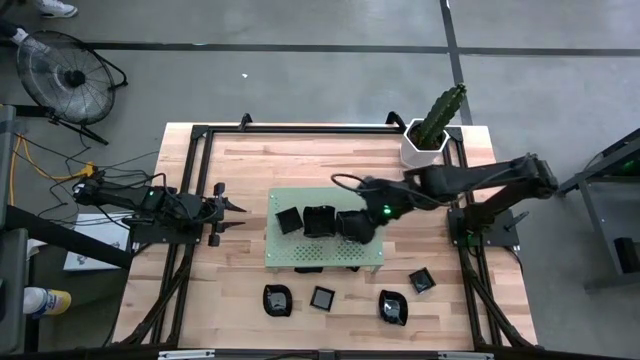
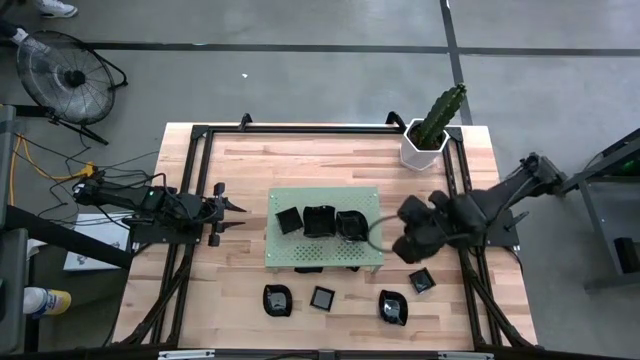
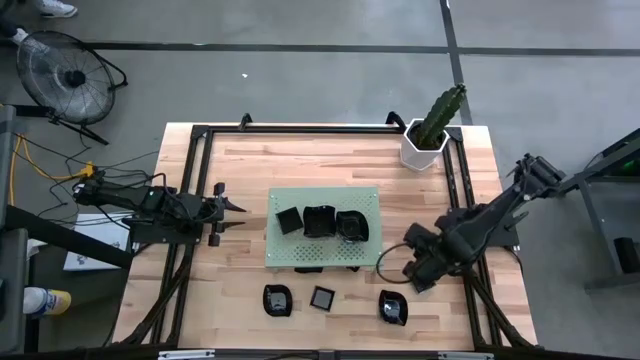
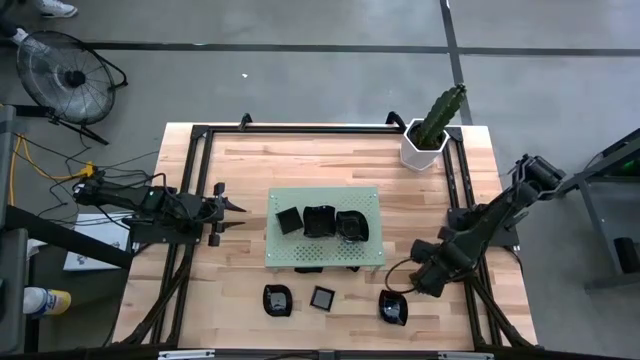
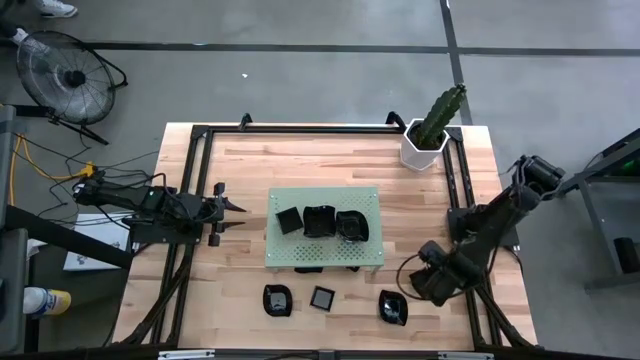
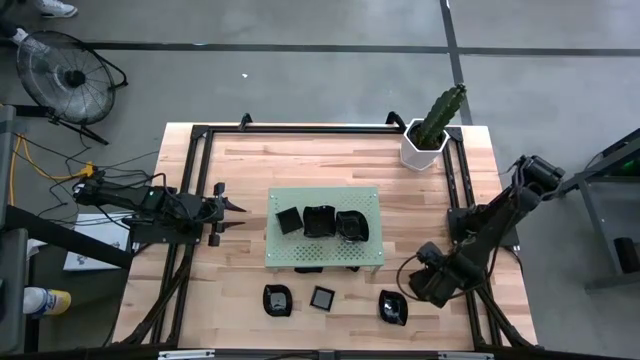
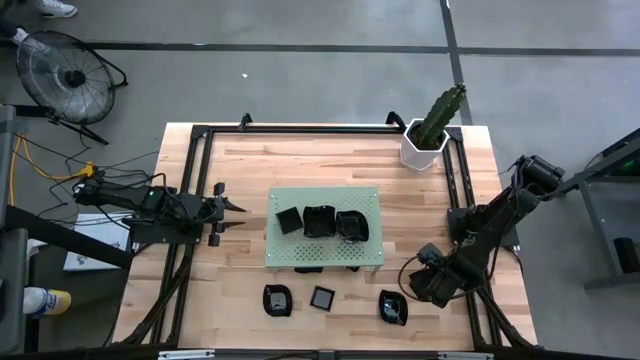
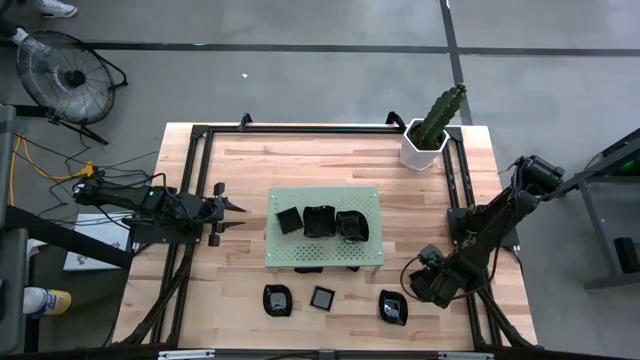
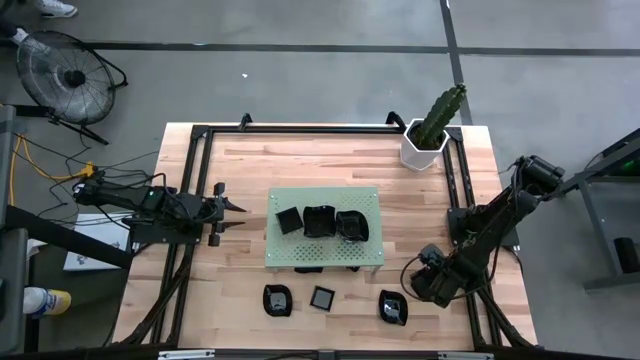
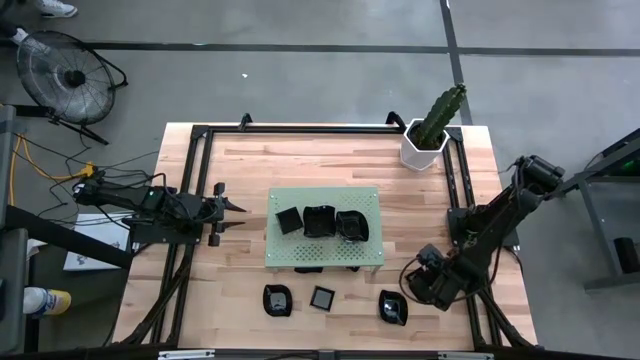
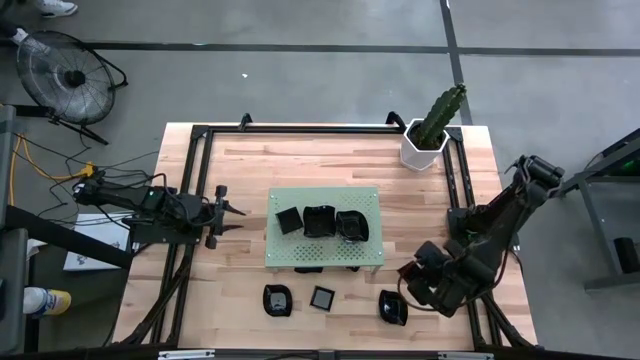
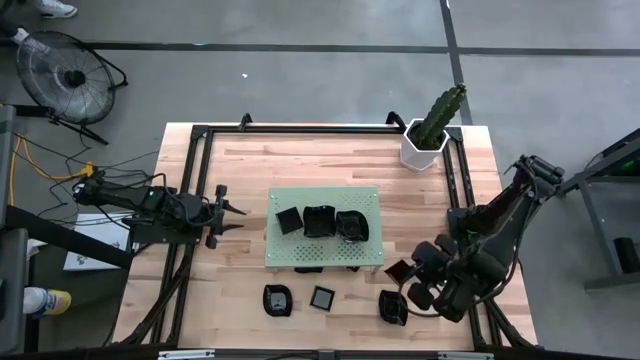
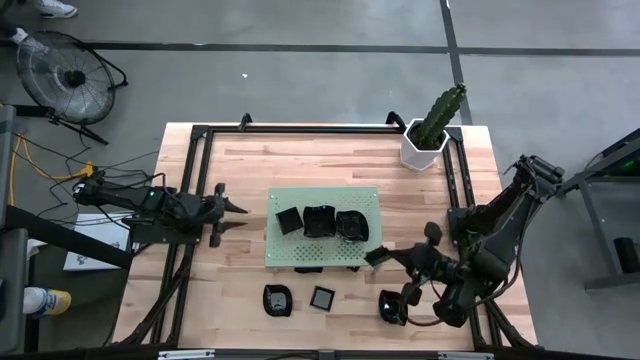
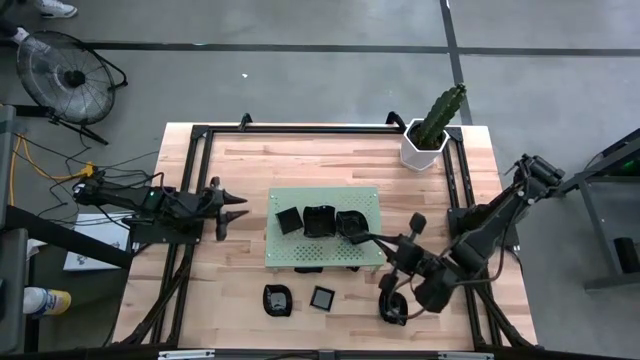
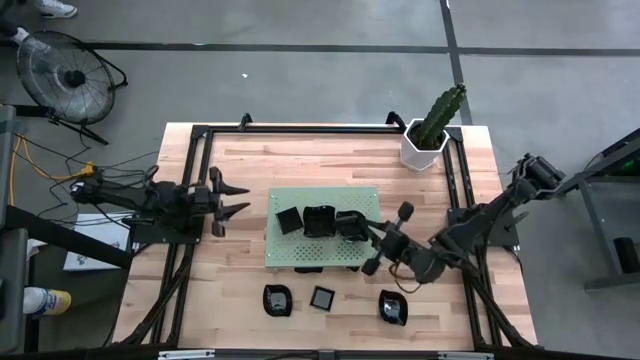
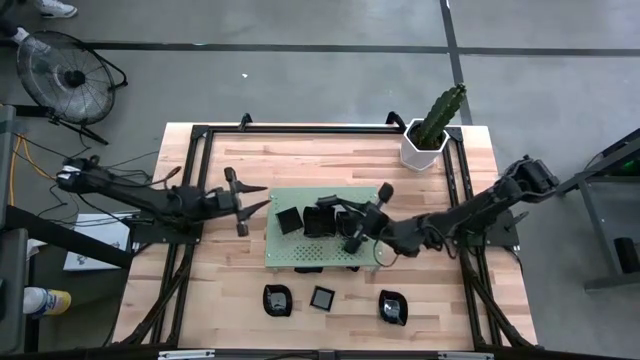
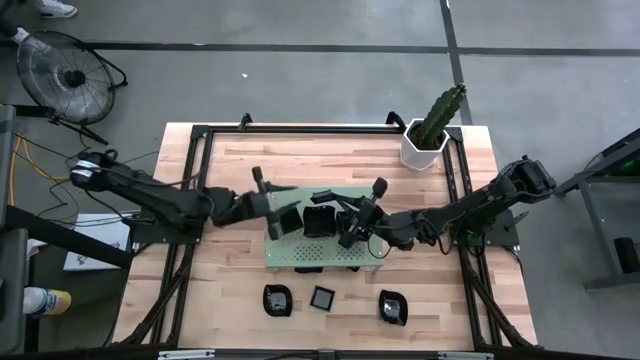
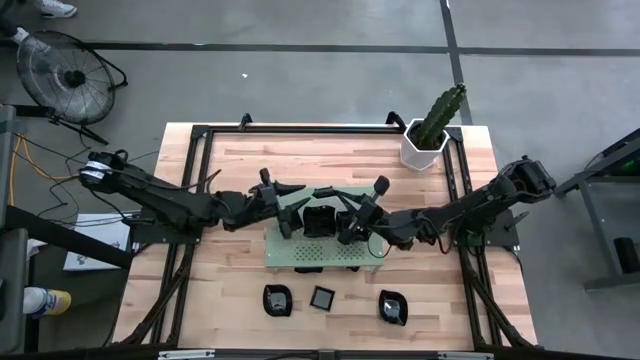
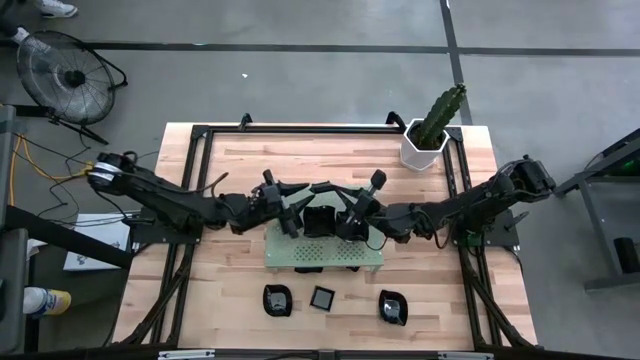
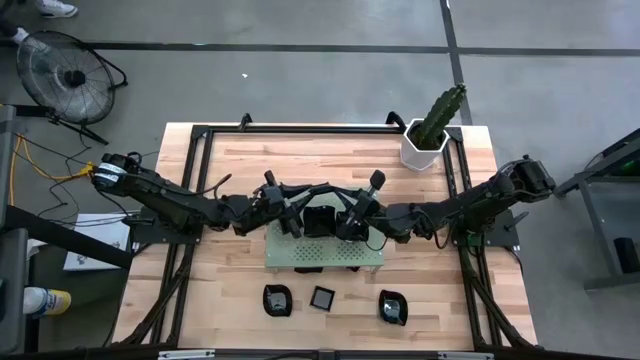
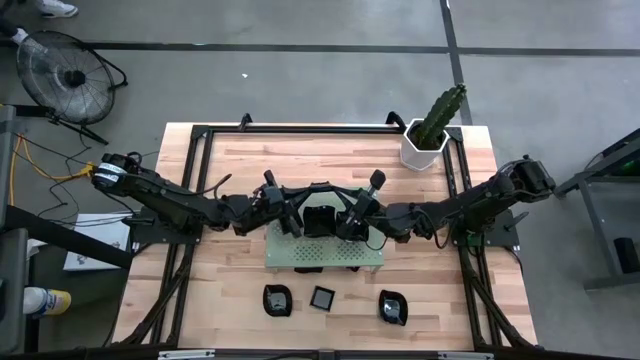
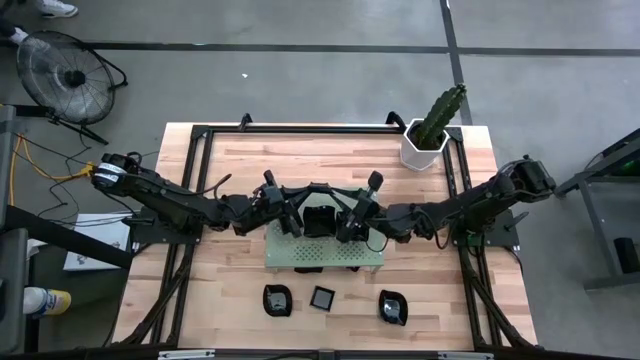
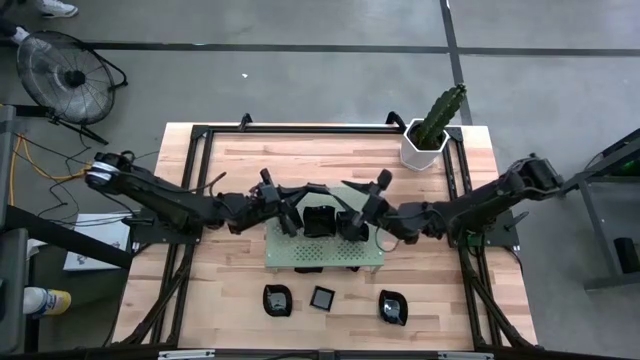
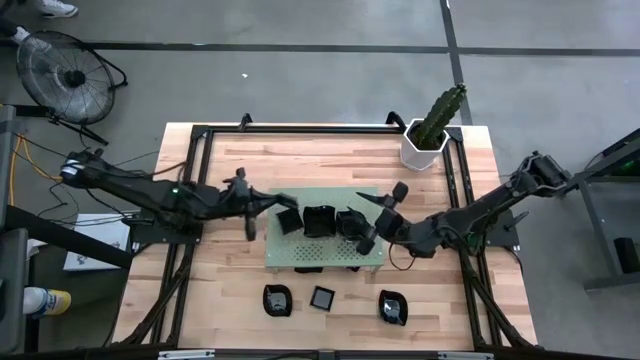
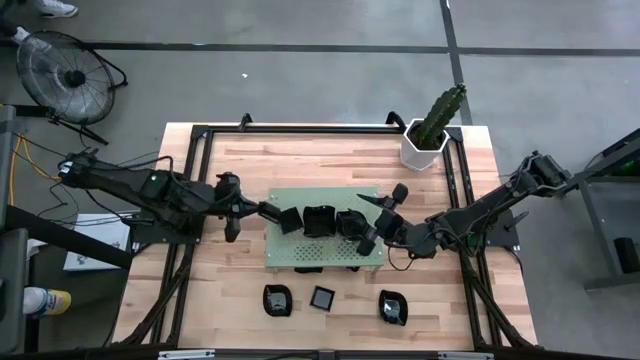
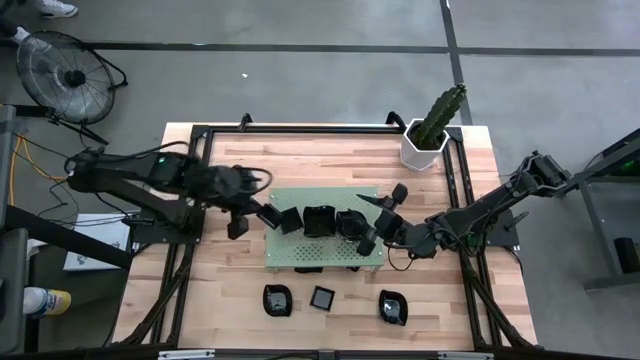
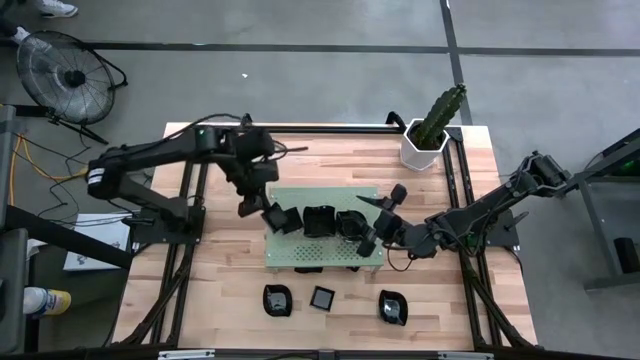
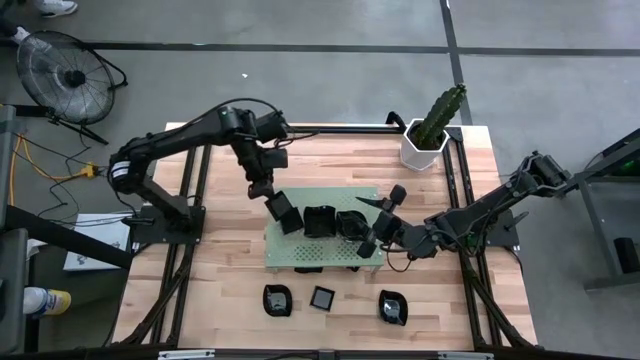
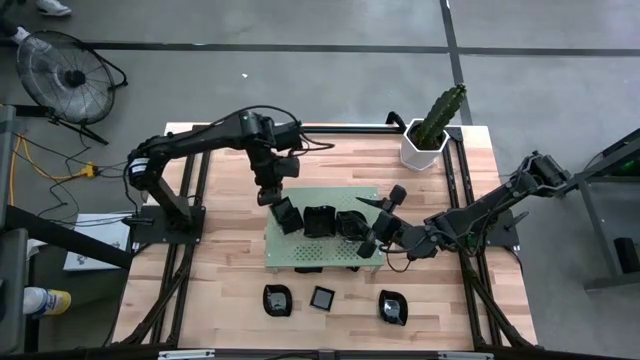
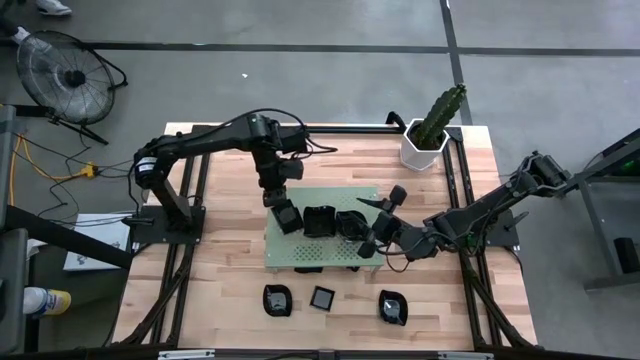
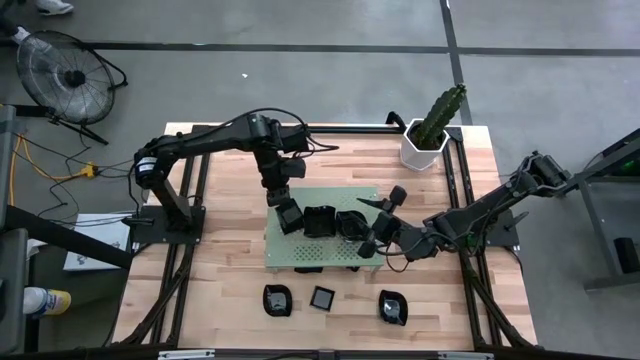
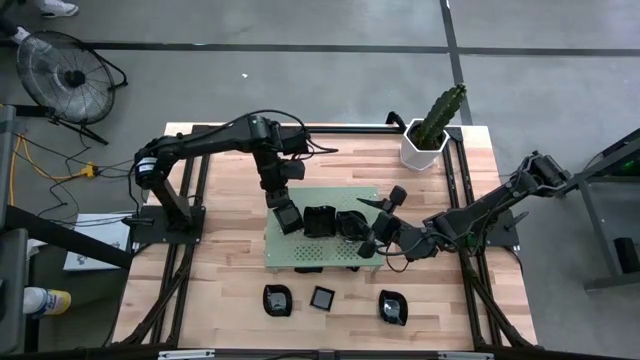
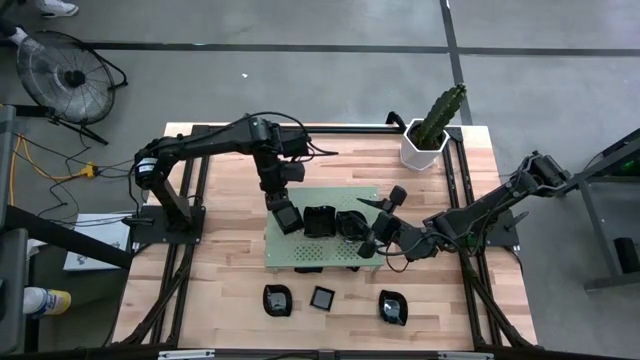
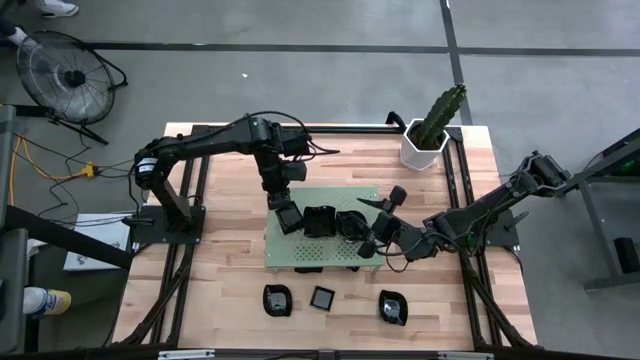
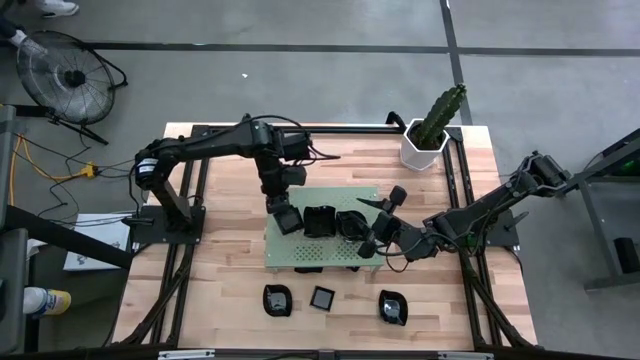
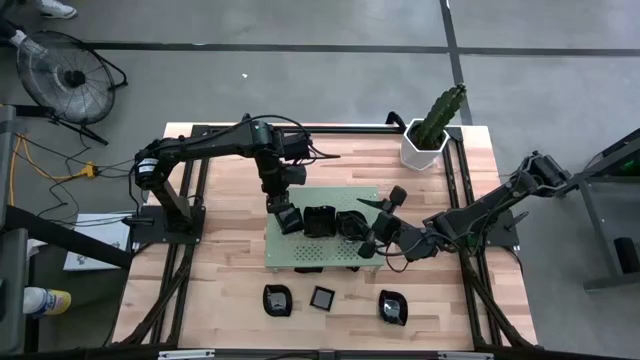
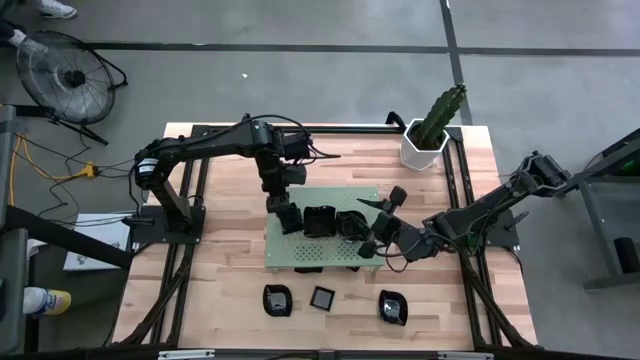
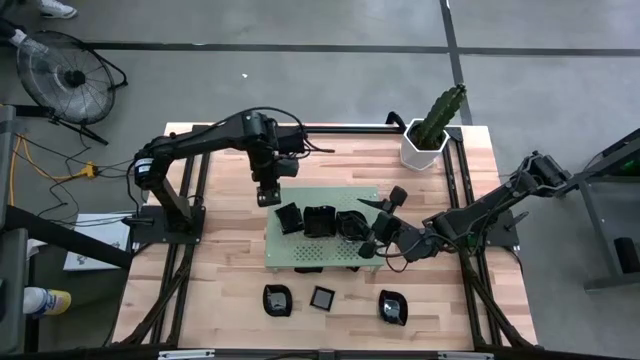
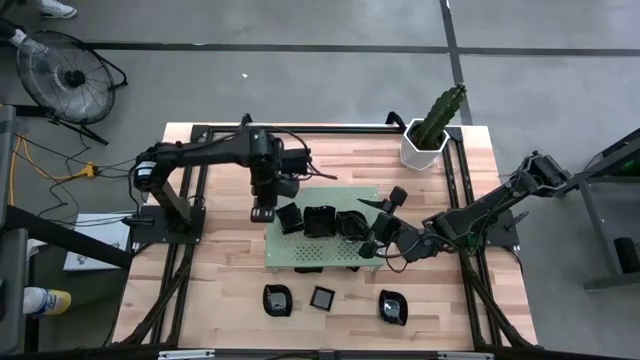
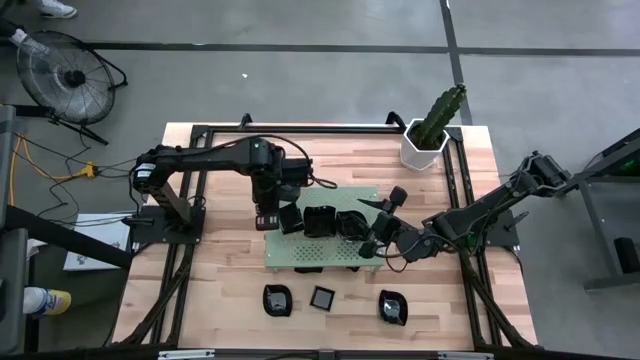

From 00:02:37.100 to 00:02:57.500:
Task: Pick & Place Mini shaped plates
Stack the black square shaped plate on top of the black square shaped plate on the shelf

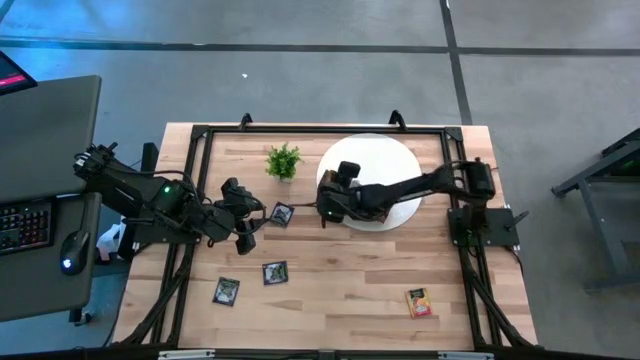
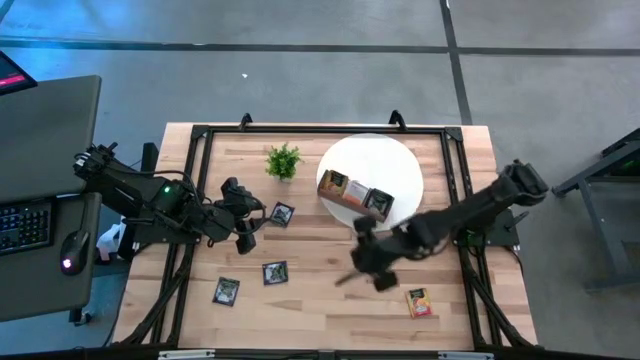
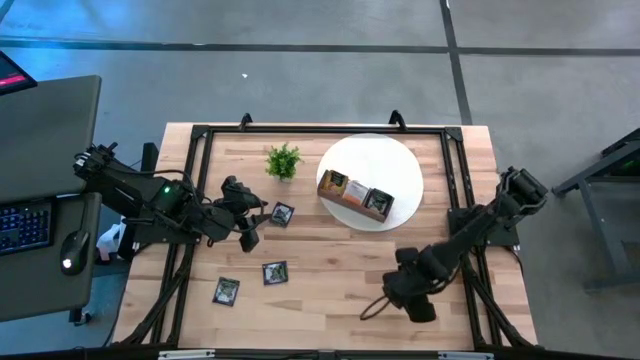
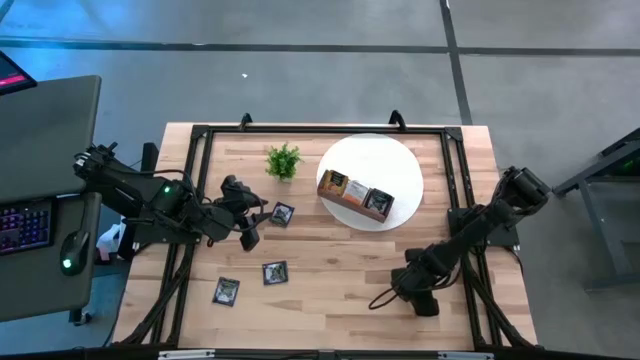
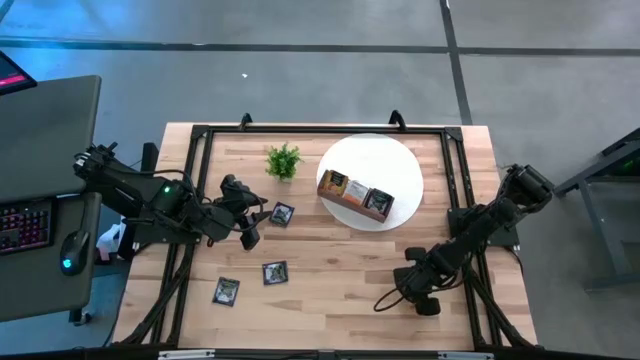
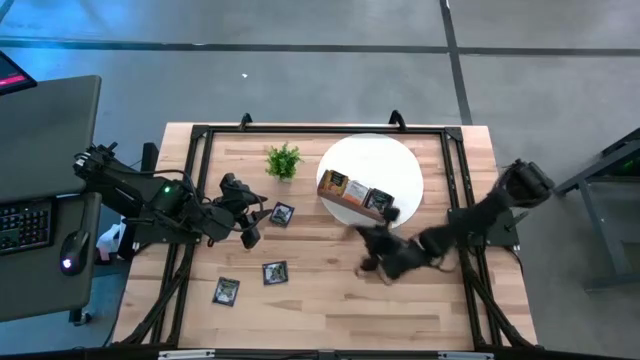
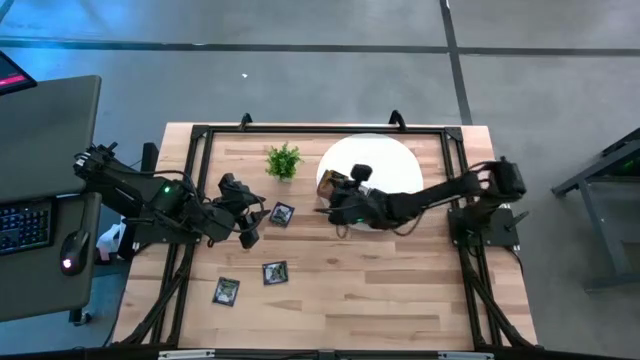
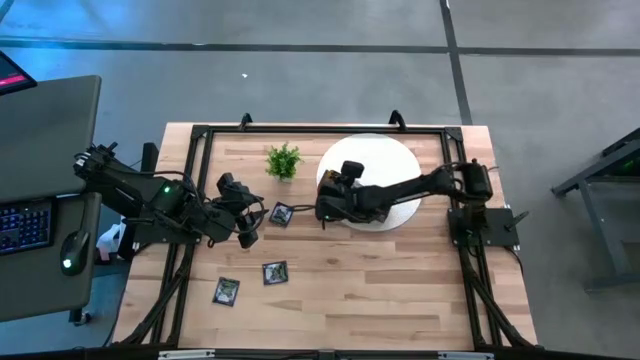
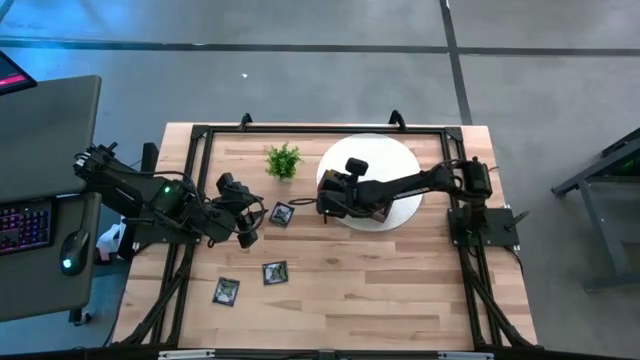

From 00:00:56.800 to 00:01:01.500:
Task: Pick & Place Tea
Put the yellow tea bag into the left compartment of the wooden organizer
